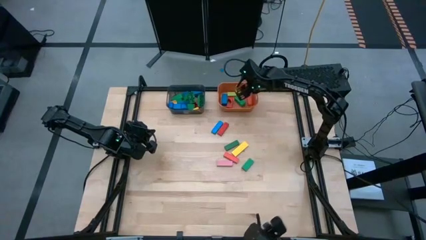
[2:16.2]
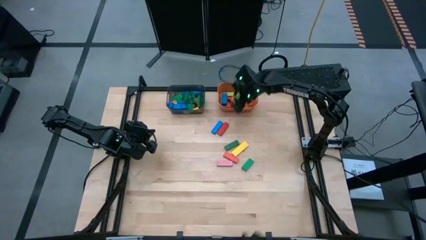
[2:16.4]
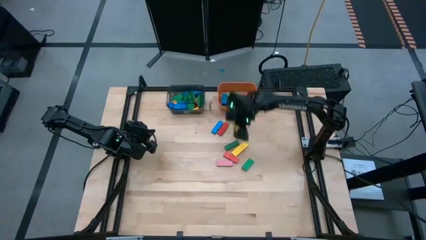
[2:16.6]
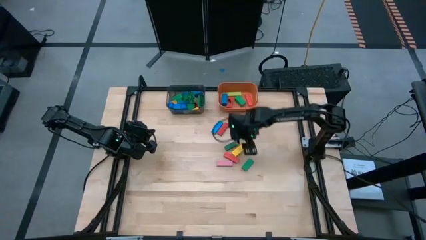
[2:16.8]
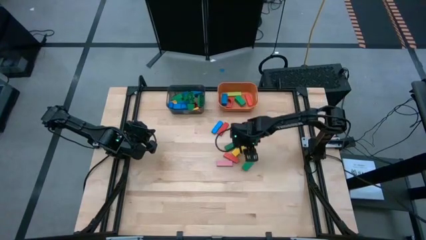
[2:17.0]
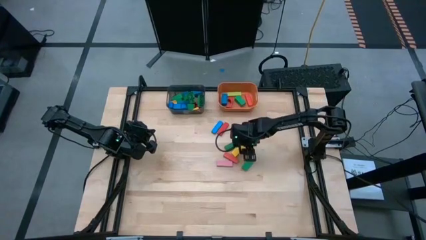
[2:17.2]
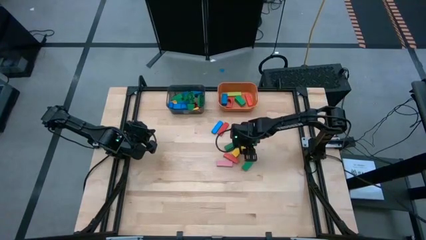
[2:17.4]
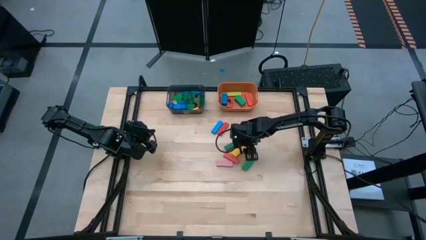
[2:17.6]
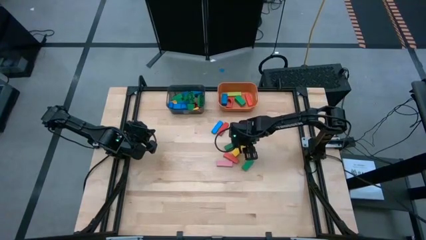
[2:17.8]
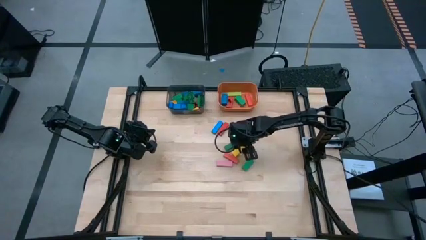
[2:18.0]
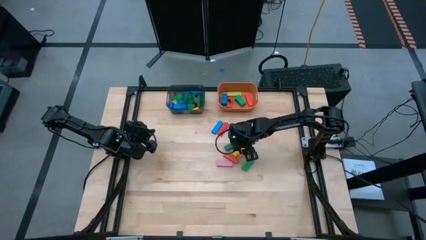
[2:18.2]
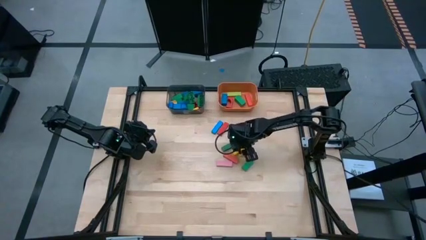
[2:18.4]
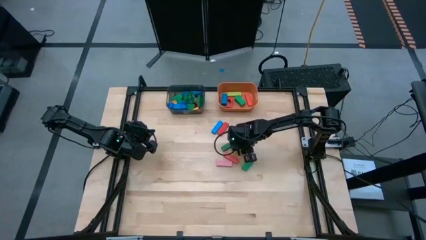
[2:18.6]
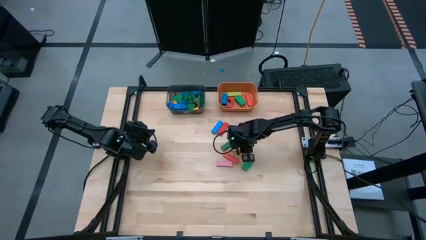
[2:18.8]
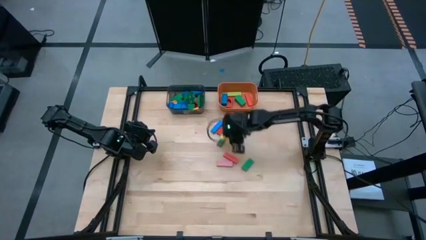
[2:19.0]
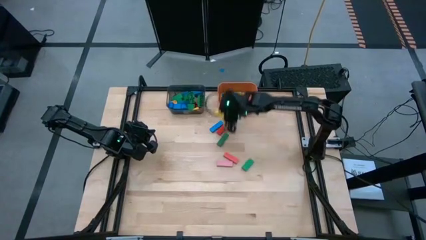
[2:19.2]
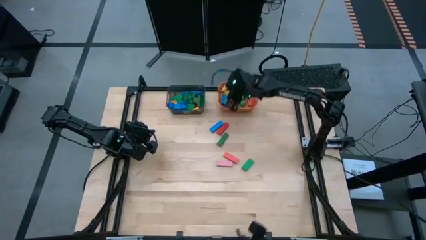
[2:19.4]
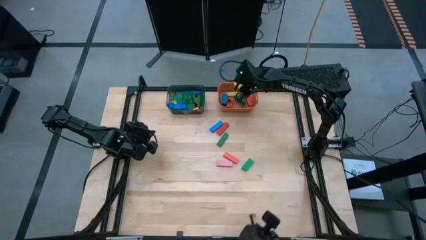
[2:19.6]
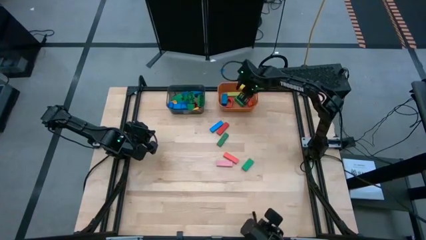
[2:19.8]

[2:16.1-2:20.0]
Task: Sort blocks by size
Put the large yellow block into the orange bin

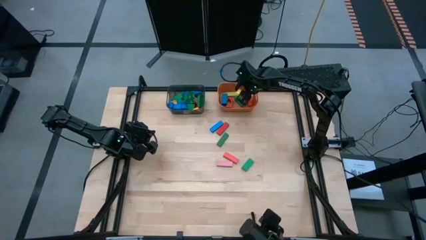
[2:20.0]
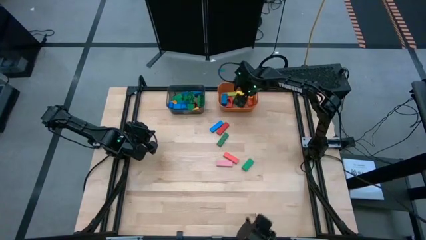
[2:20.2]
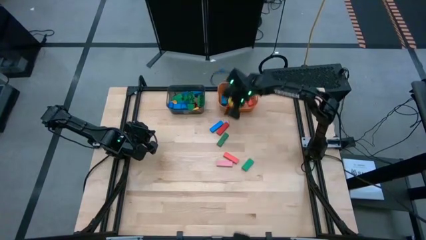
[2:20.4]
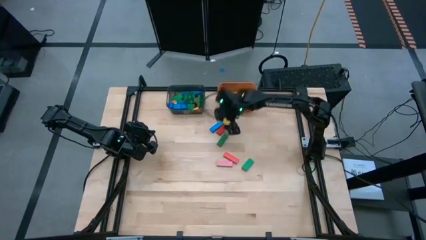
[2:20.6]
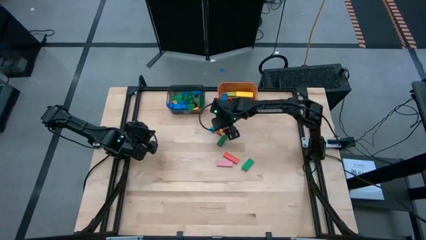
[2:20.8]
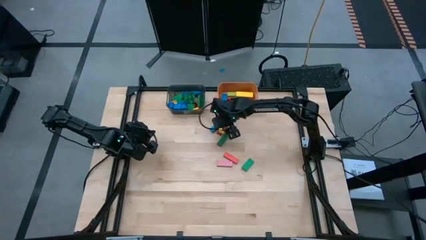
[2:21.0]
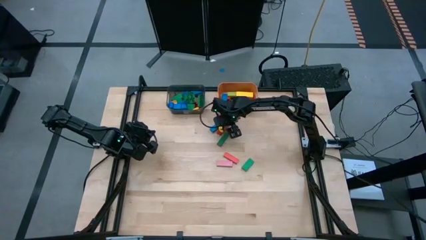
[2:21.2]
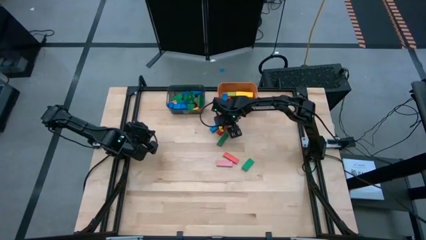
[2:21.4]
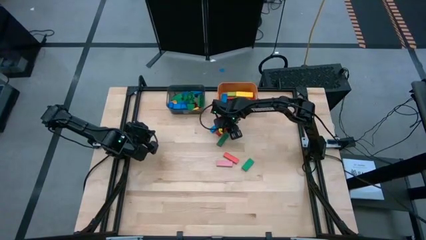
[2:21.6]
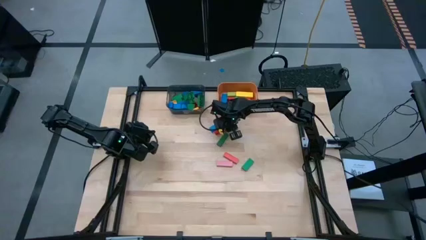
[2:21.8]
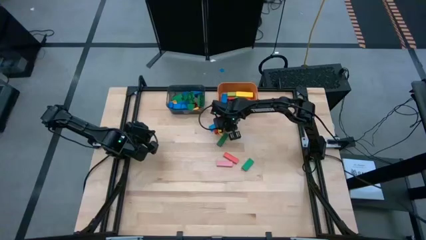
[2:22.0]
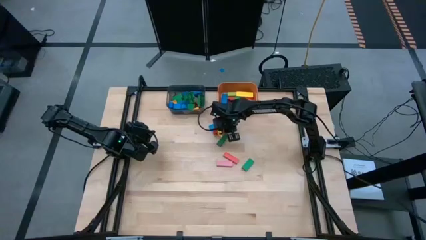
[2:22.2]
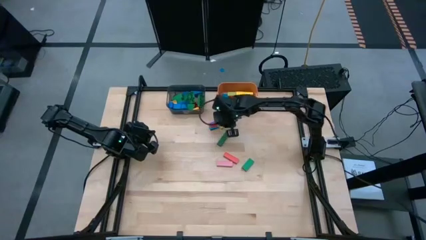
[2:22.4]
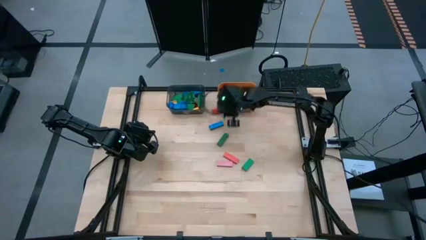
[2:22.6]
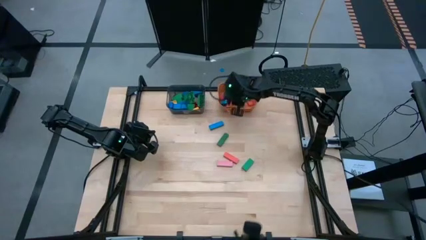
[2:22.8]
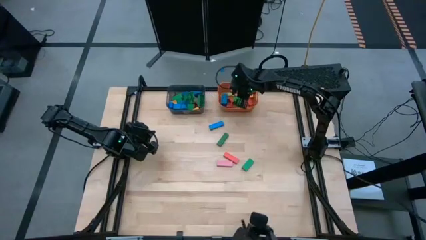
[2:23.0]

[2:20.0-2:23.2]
Put the large red block into the orange bin

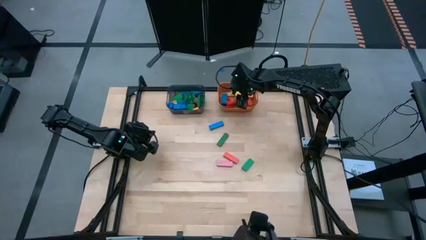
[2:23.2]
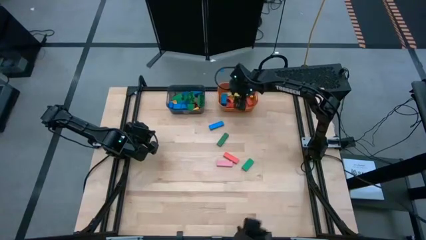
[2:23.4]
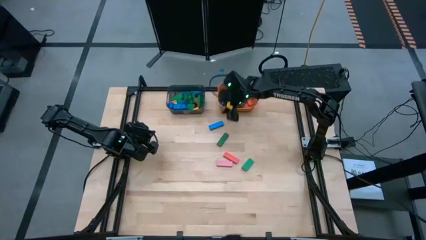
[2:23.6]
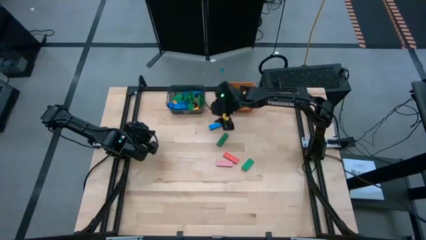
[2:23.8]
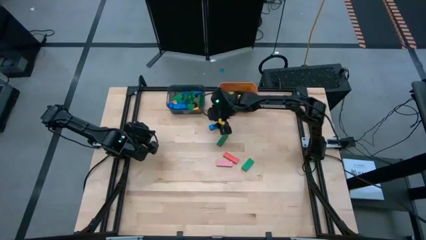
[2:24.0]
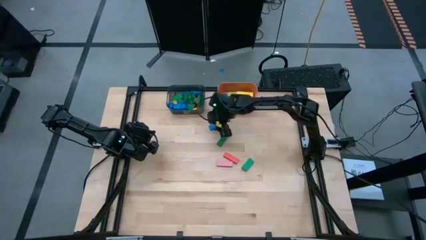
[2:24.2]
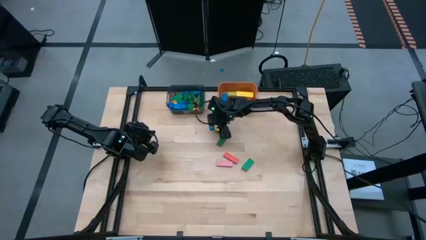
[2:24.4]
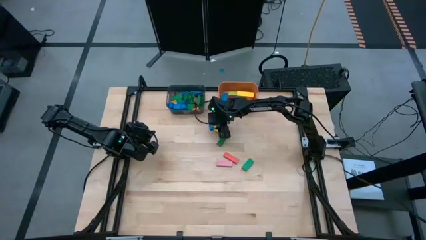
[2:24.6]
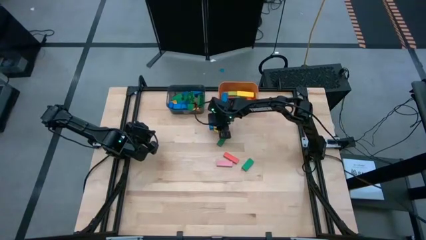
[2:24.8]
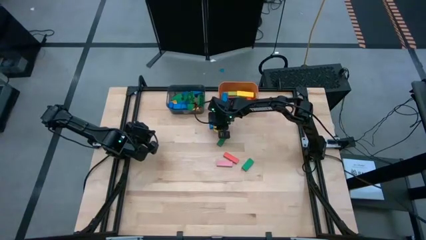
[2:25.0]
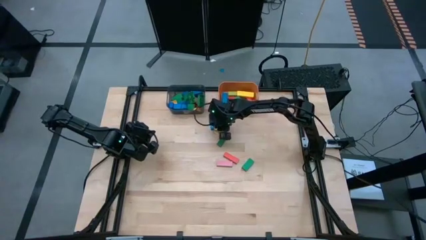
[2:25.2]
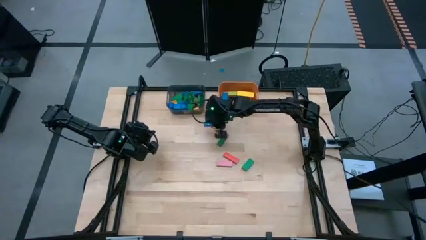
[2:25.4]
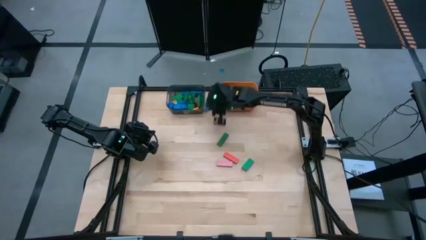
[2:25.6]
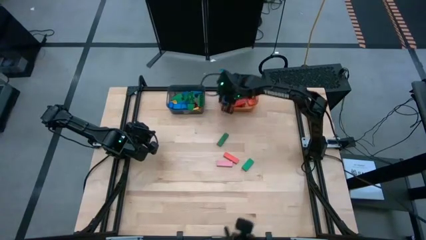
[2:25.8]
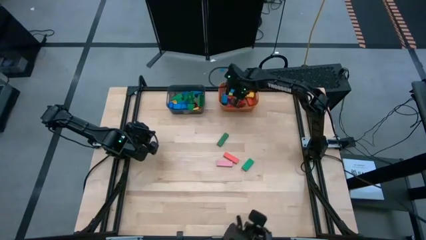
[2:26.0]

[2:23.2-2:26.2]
Put the large blue block into the orange bin

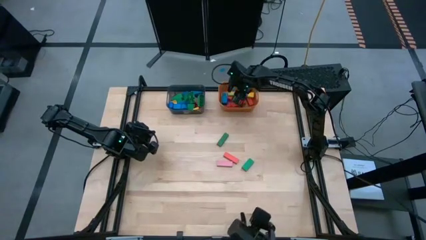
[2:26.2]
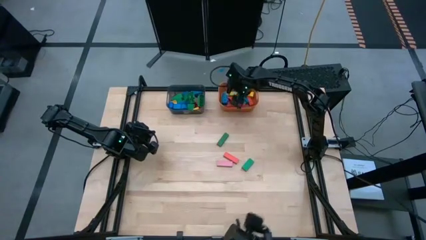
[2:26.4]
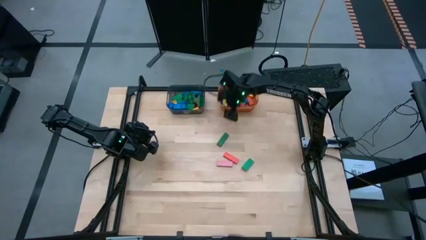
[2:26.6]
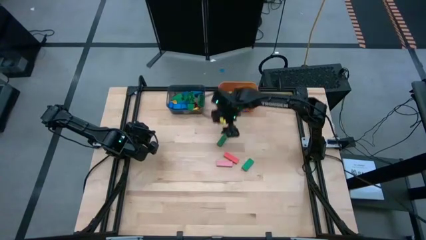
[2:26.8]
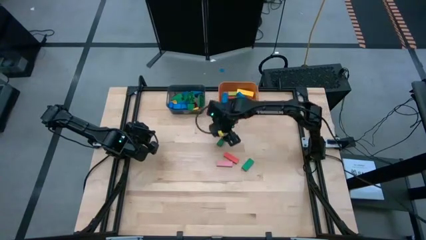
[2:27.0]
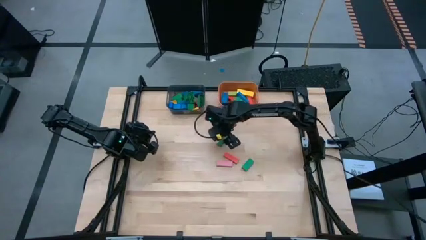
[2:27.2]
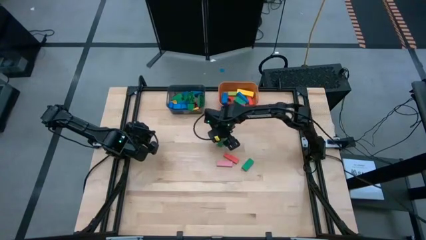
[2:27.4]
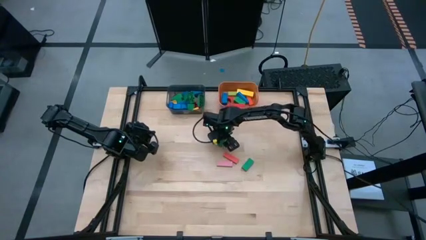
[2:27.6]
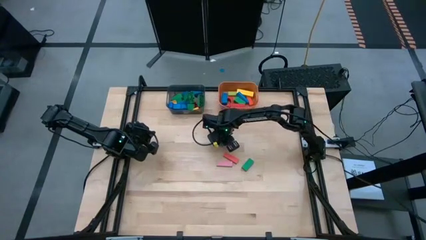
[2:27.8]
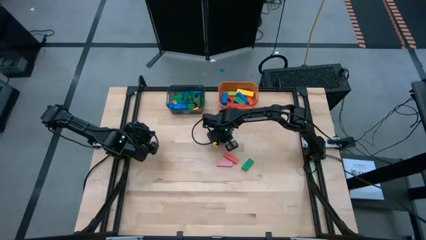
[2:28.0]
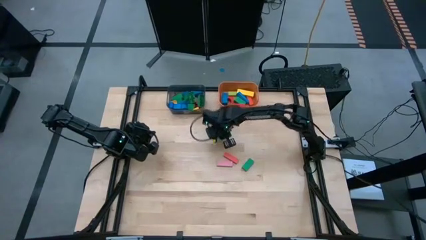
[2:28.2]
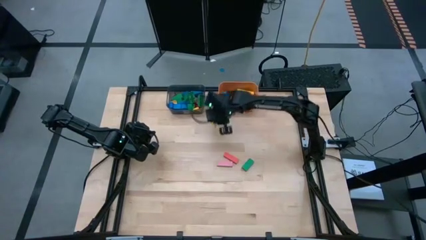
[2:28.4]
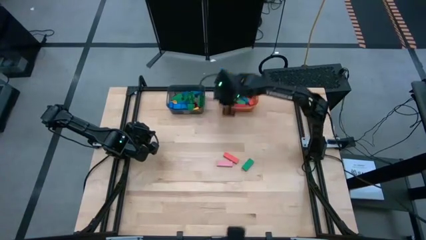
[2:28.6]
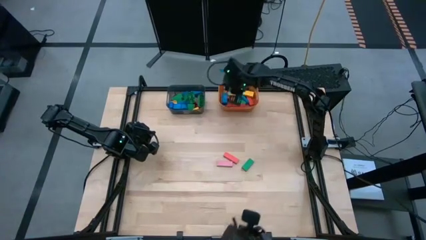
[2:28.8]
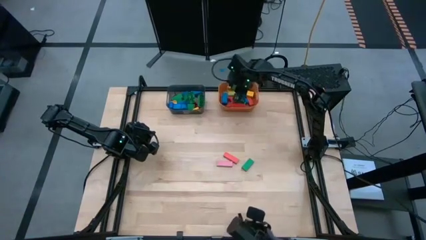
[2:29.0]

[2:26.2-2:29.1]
Put the large green block into the orange bin

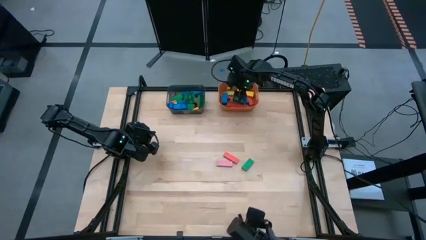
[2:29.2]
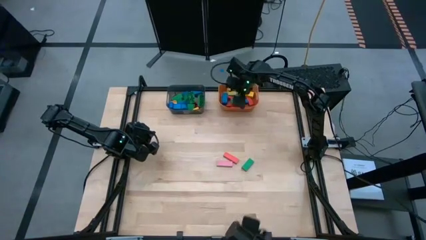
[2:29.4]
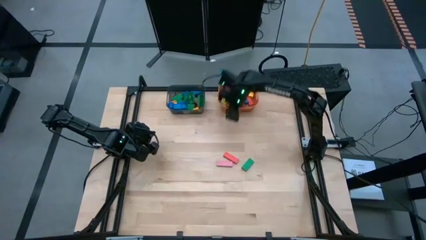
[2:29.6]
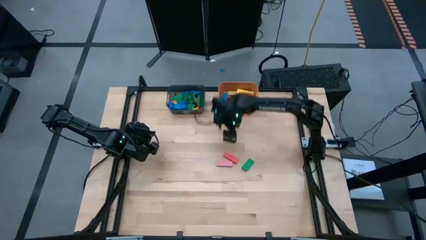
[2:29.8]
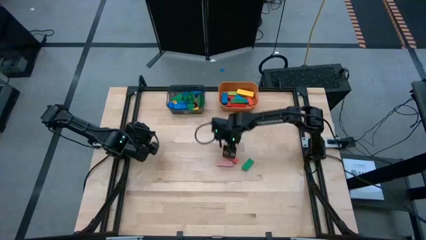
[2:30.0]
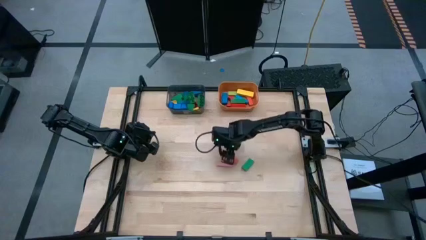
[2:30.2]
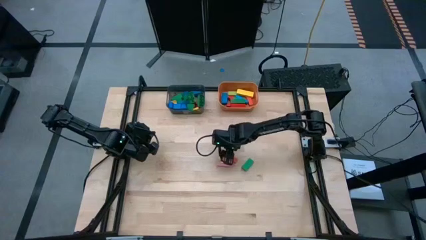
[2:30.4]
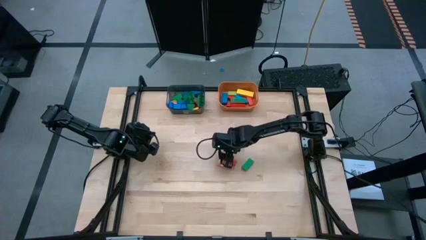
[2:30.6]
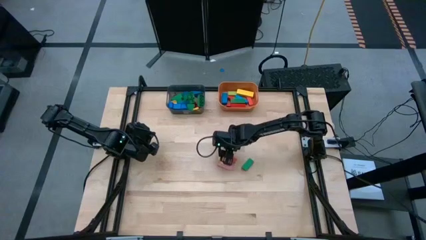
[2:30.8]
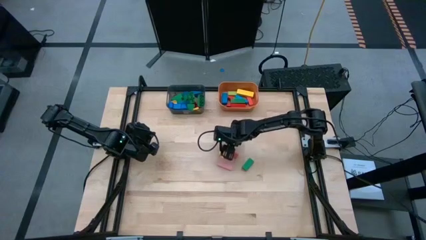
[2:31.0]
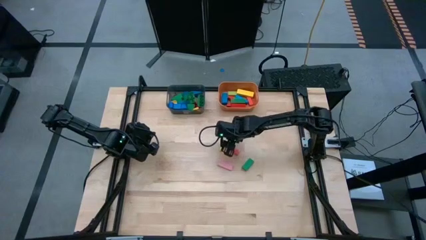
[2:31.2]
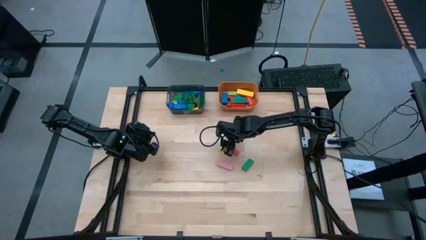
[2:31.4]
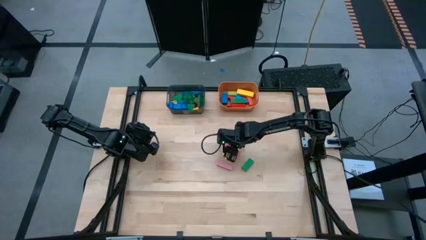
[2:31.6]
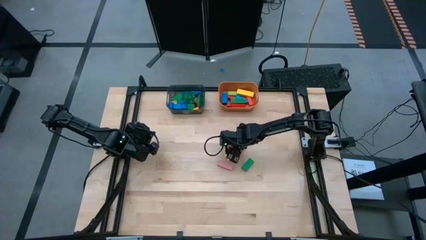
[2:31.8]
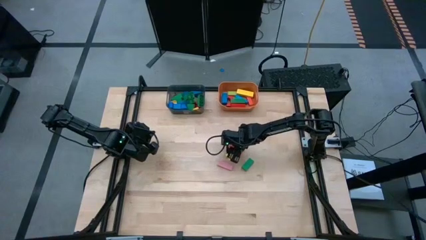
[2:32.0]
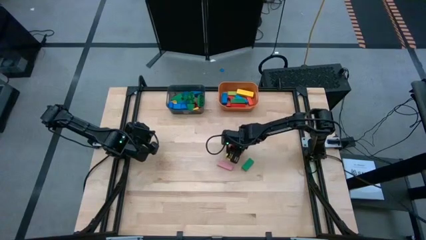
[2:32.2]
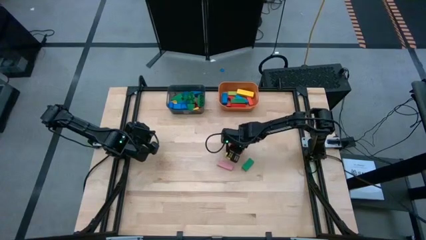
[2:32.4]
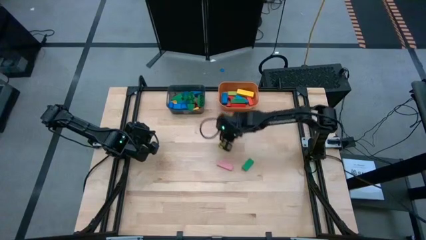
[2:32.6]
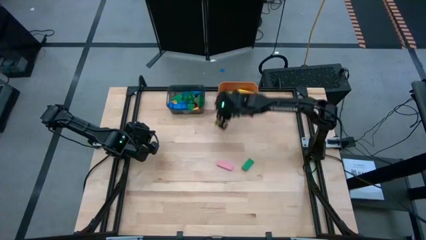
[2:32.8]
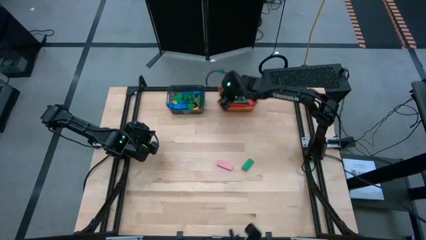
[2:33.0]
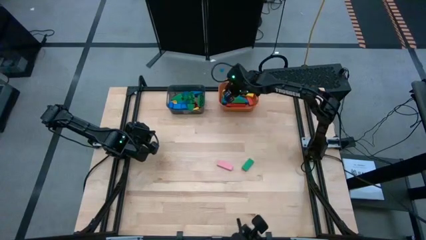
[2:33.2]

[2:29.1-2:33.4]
Put the large red block into the orange bin
